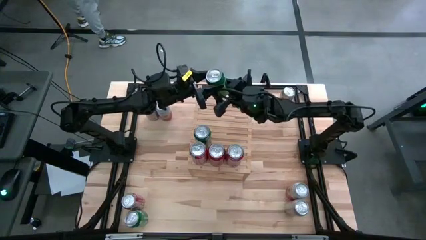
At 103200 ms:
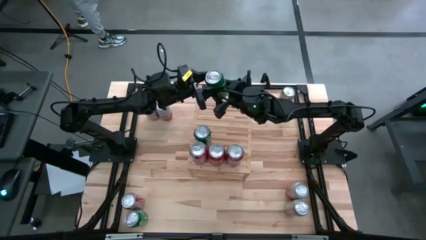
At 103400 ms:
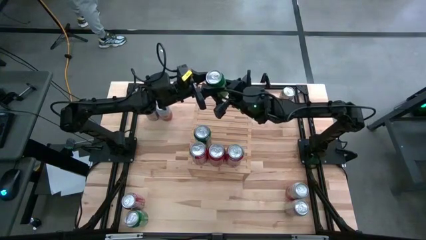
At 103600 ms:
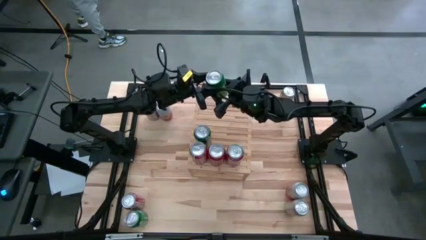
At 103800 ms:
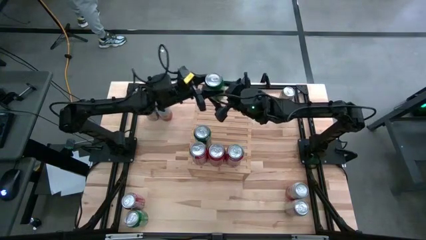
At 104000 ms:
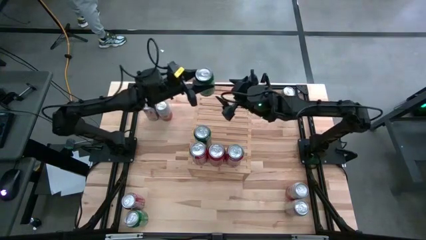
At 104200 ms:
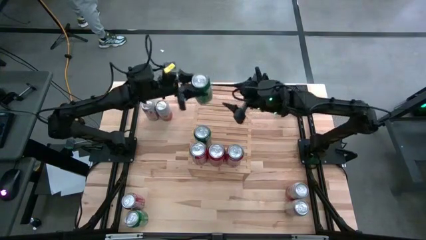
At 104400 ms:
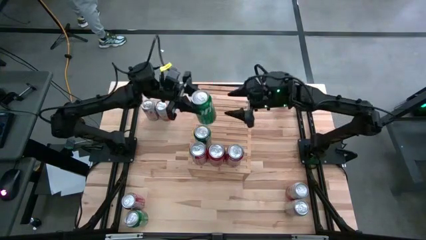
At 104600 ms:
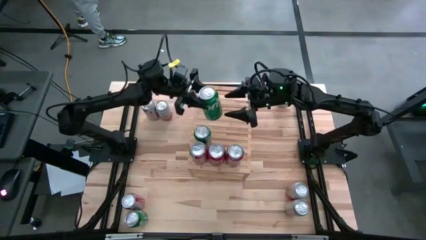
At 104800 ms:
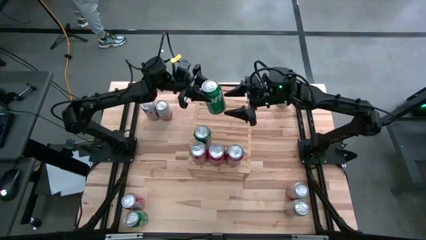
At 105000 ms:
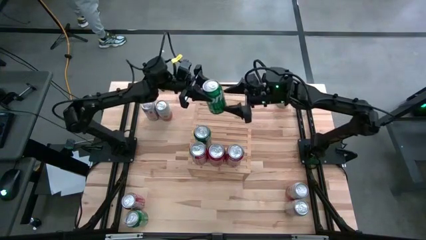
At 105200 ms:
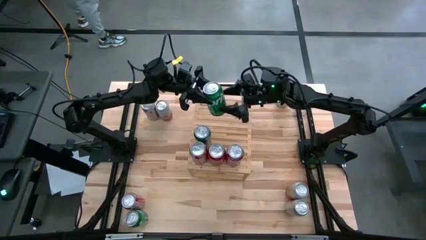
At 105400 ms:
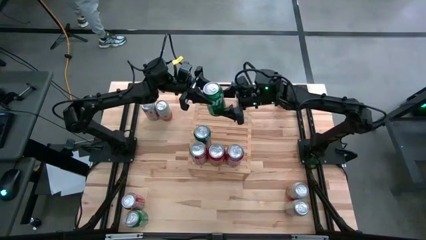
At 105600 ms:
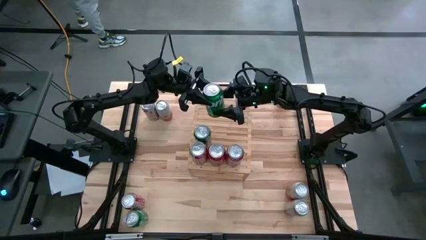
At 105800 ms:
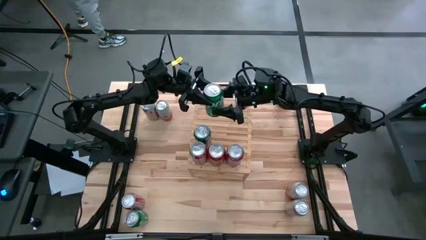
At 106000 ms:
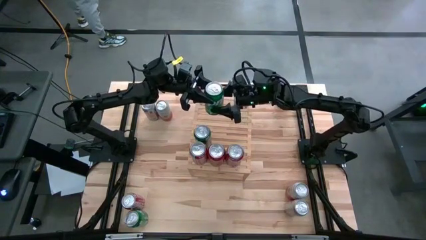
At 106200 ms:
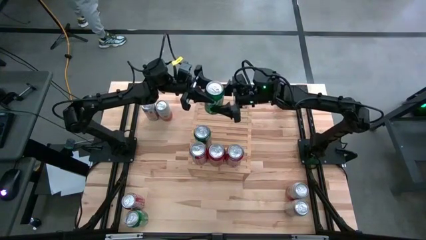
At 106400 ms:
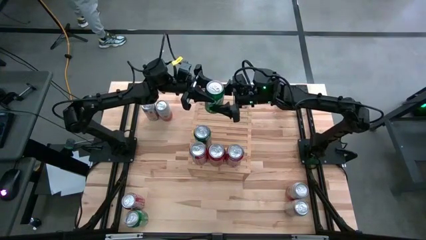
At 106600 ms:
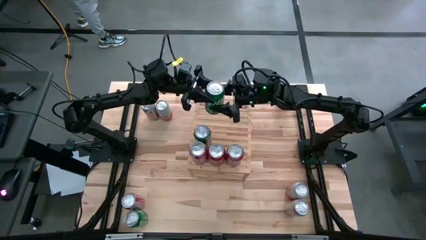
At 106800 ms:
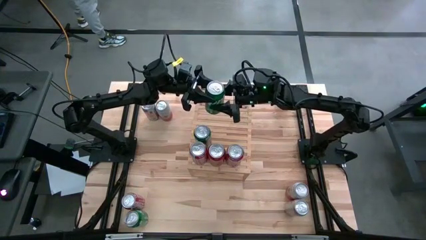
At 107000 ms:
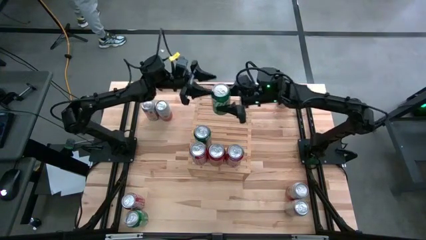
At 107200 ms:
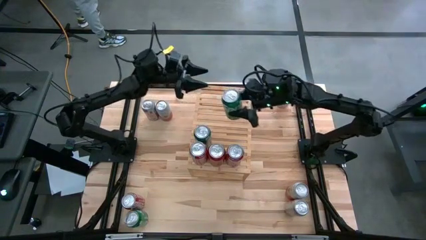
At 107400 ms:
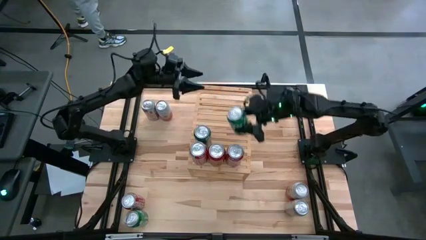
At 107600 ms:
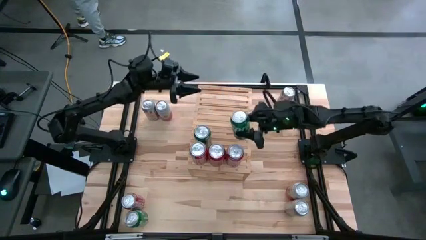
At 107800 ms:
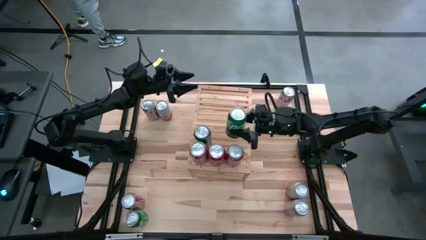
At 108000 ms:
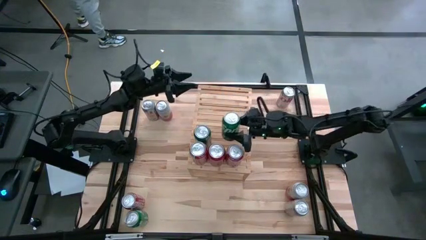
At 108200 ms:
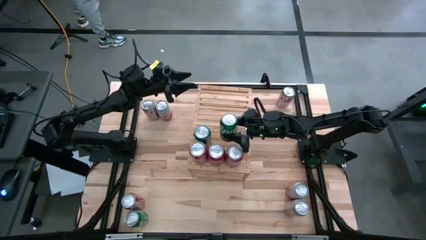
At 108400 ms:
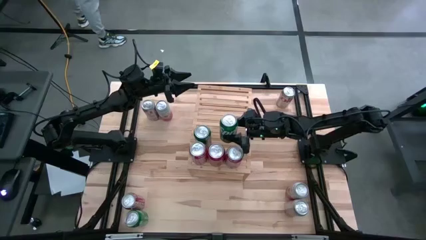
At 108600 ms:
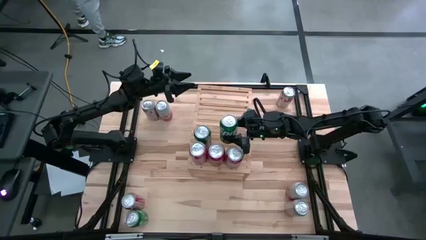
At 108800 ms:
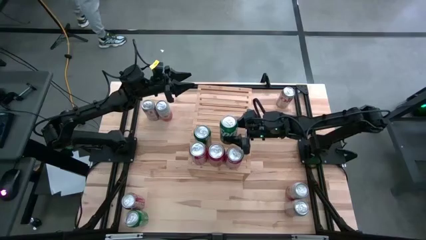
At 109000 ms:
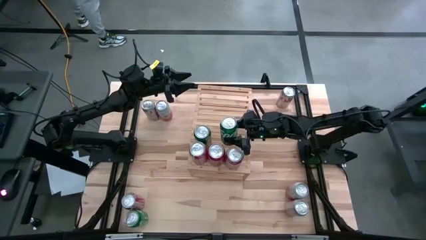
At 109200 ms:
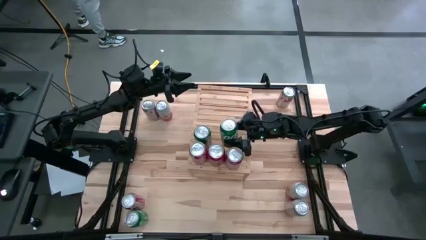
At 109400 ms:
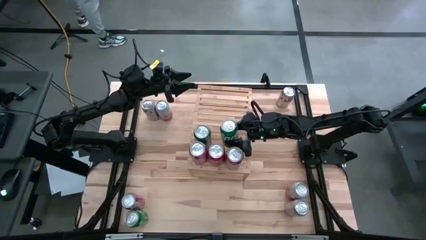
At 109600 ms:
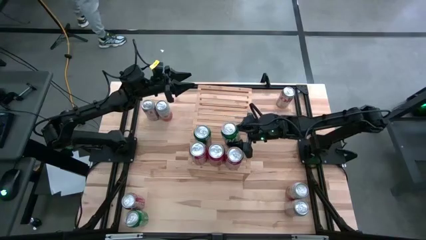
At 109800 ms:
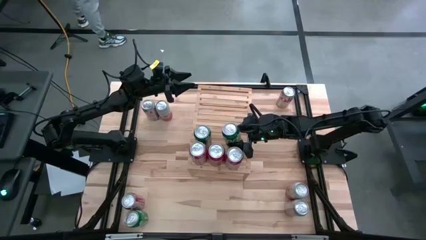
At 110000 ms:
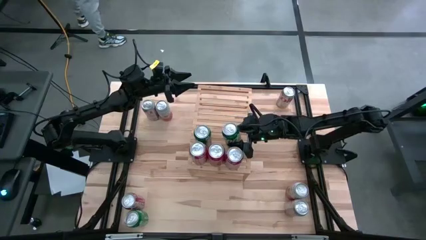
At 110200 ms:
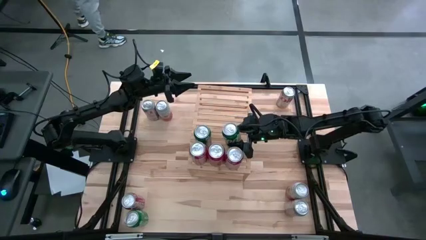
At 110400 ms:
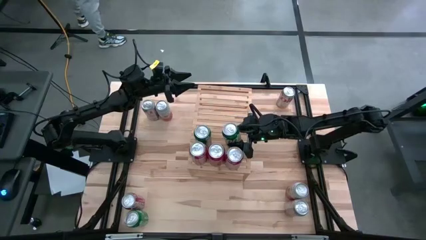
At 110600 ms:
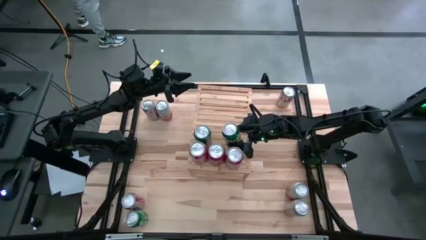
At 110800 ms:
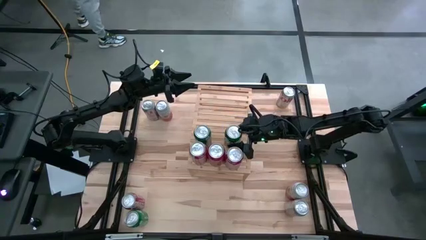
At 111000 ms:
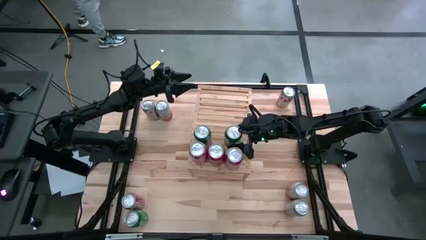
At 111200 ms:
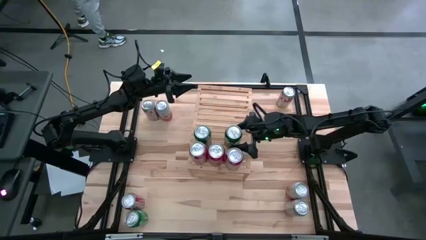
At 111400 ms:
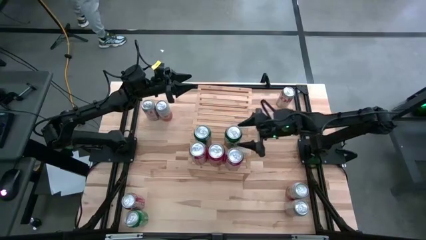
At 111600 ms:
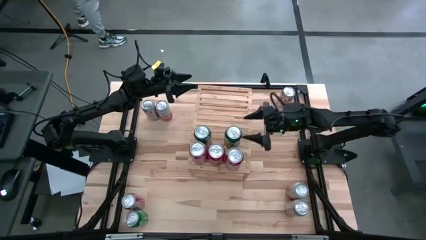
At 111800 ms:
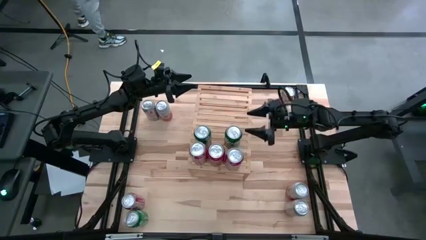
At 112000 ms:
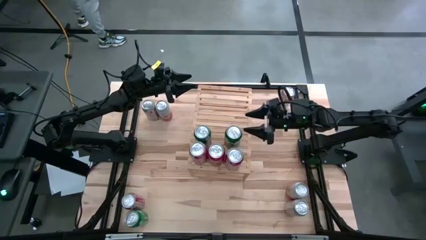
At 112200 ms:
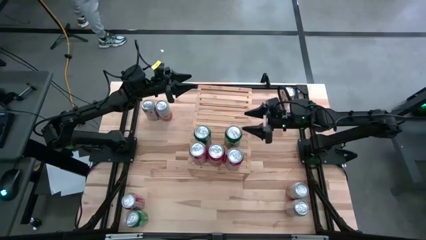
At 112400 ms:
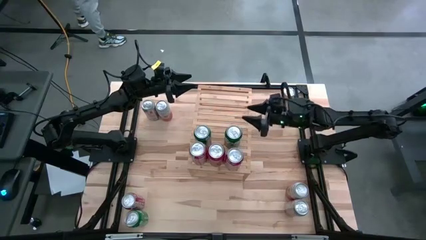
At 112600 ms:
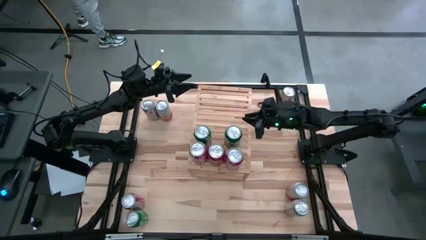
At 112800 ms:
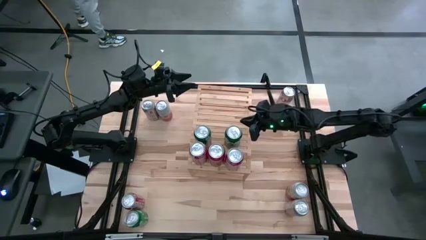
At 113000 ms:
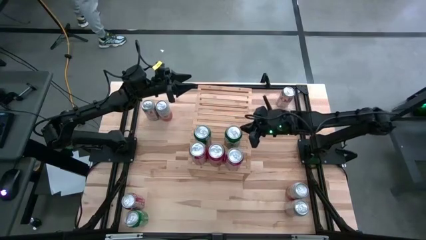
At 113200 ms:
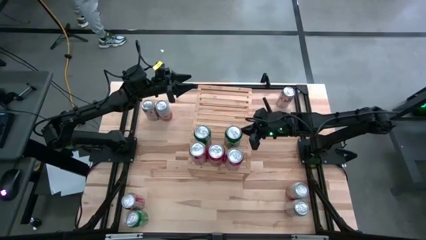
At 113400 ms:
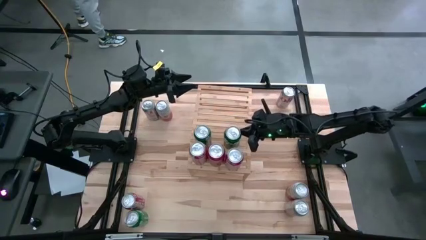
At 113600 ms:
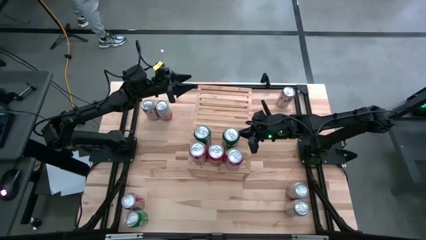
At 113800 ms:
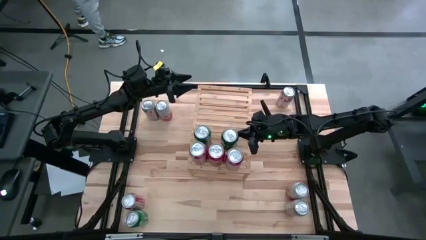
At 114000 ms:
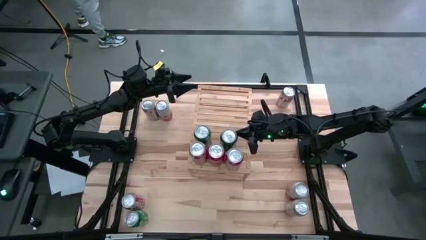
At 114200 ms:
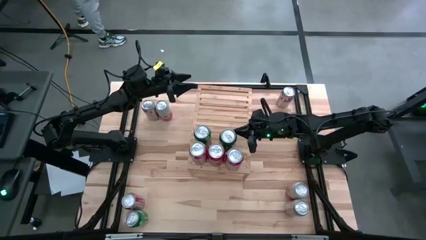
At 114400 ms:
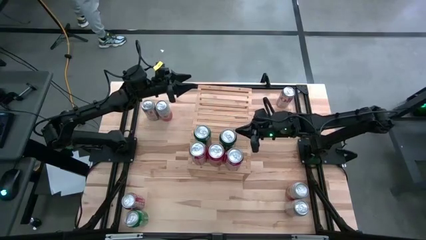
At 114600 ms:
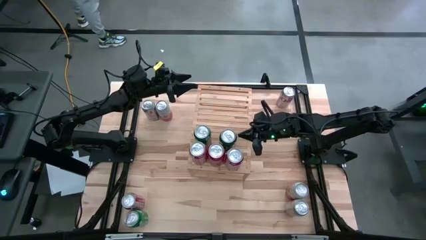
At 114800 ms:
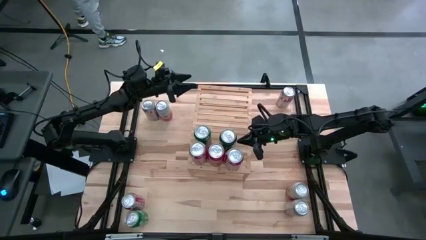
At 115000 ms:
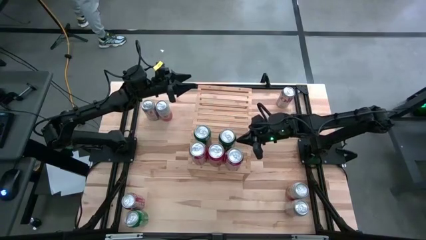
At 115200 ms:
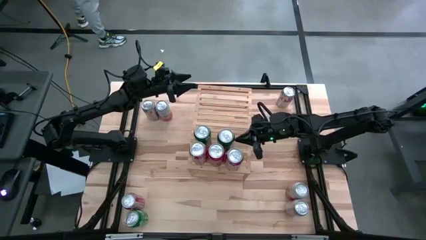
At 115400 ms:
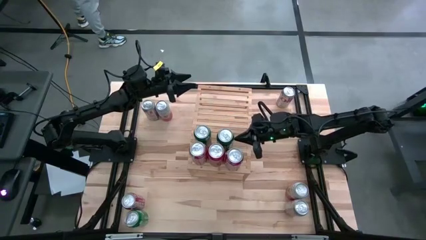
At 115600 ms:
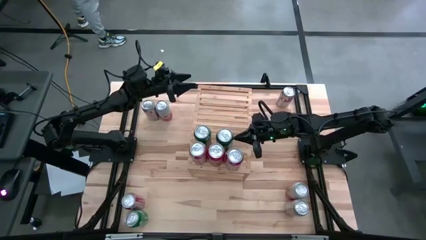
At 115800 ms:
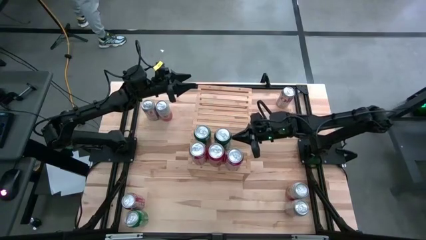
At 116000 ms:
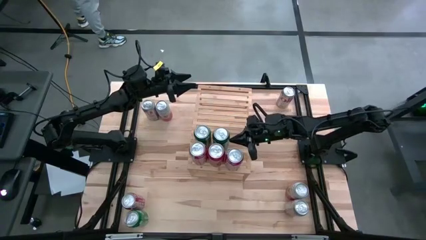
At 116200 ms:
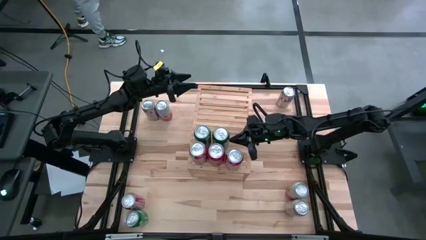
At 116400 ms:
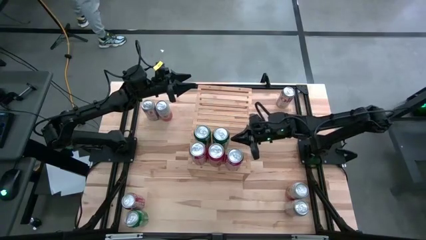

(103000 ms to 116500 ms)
Task: Place canned beverage on shelf
Put the top green soda can on the shelf aligned with the other green soda can

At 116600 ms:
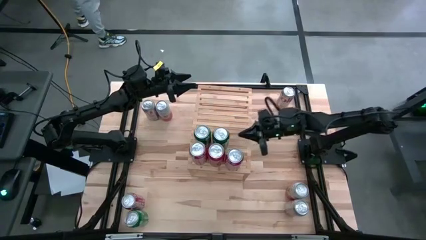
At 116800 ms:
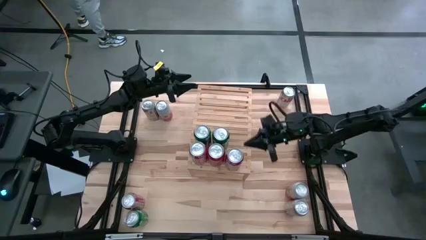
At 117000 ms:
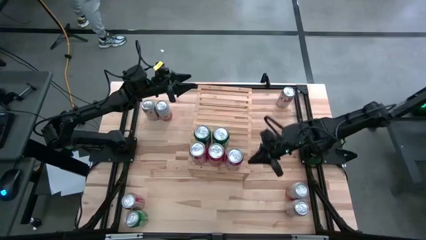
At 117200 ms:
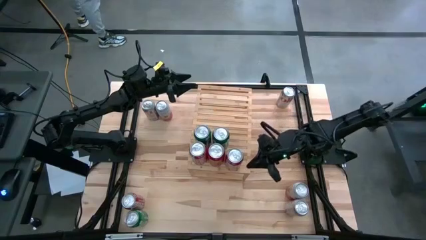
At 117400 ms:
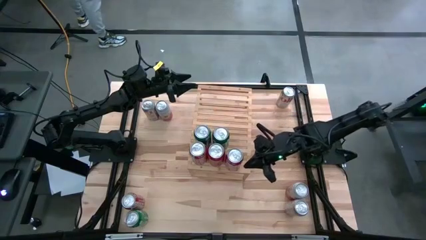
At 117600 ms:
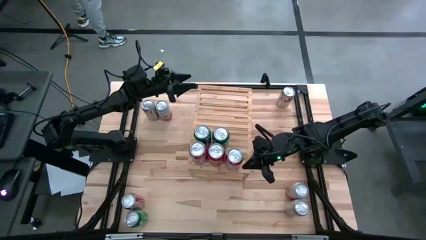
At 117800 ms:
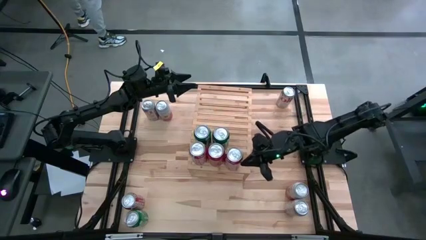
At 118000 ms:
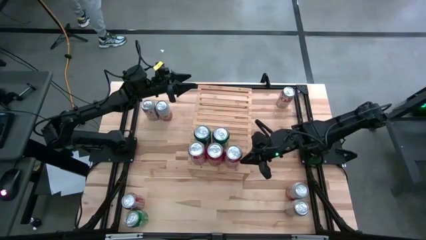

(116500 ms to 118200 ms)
Adjust the right red soda can on the shelf
